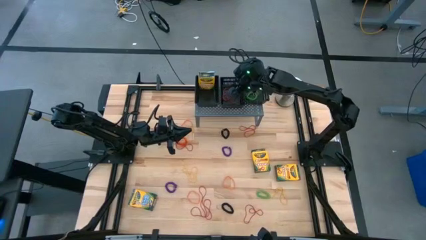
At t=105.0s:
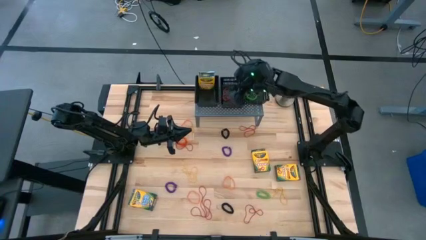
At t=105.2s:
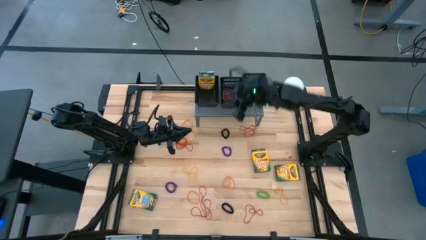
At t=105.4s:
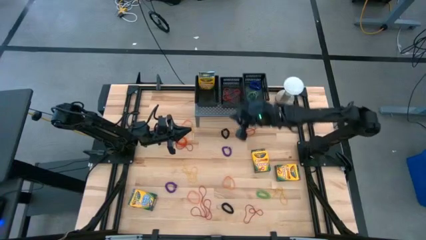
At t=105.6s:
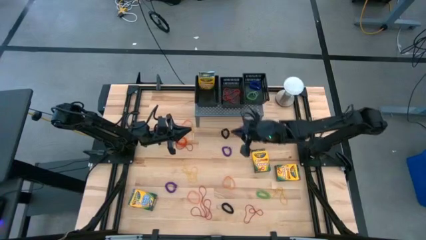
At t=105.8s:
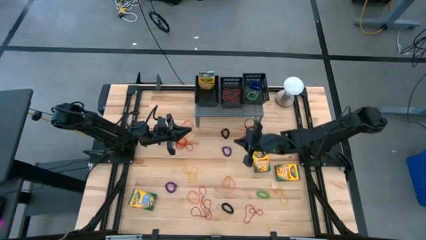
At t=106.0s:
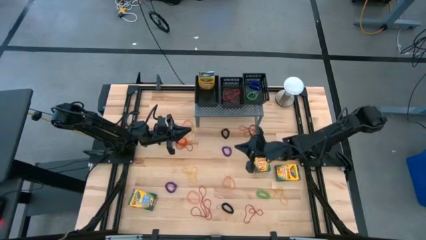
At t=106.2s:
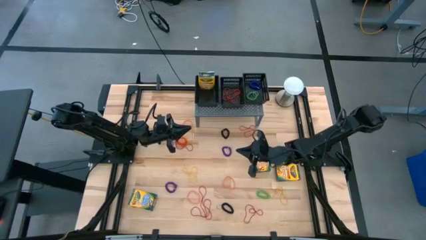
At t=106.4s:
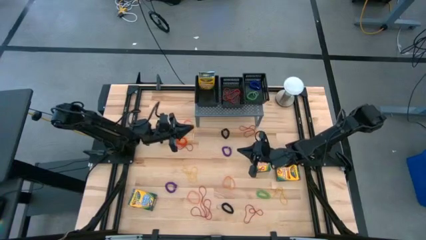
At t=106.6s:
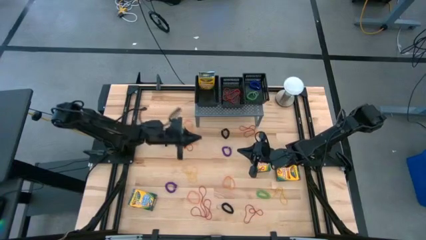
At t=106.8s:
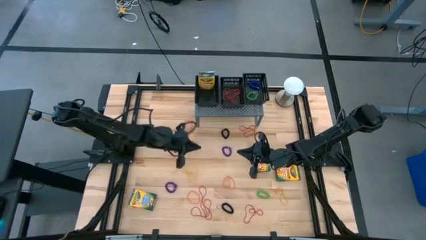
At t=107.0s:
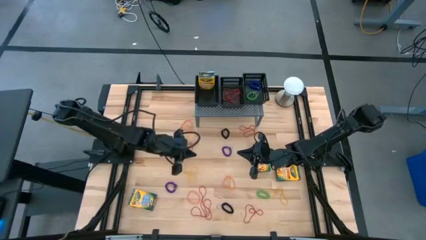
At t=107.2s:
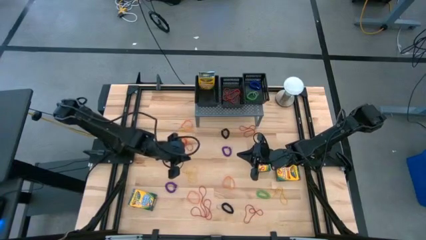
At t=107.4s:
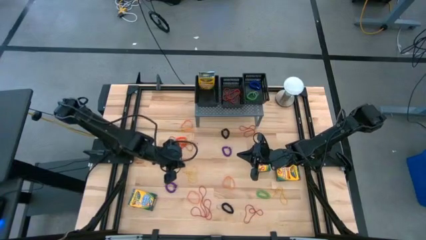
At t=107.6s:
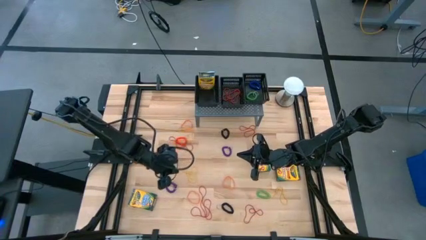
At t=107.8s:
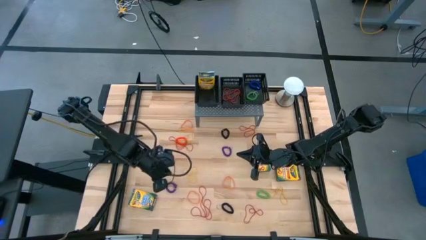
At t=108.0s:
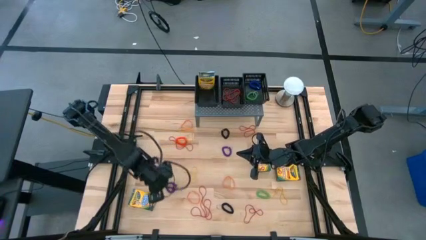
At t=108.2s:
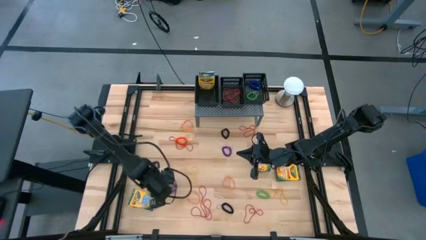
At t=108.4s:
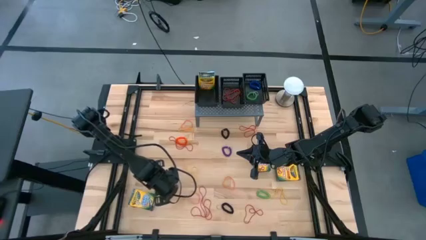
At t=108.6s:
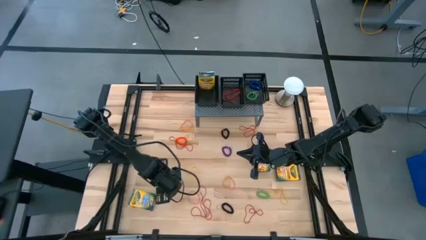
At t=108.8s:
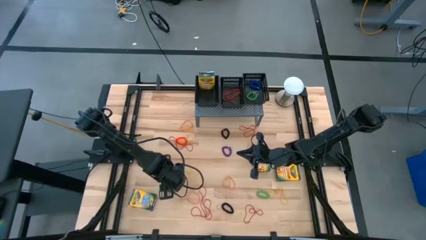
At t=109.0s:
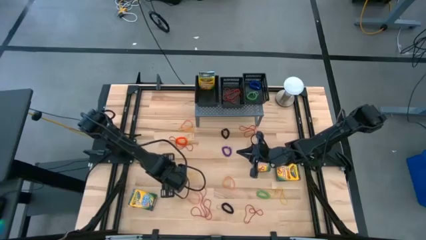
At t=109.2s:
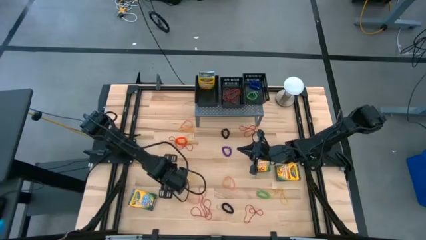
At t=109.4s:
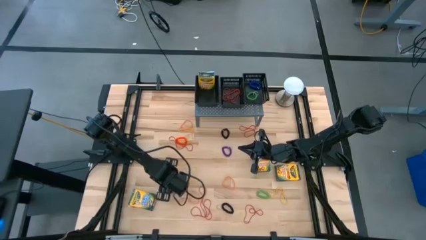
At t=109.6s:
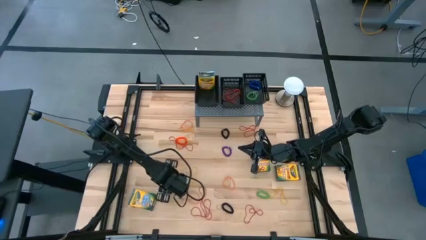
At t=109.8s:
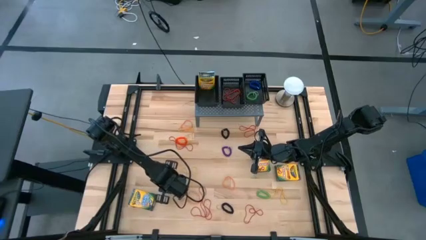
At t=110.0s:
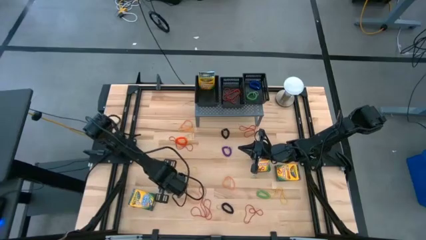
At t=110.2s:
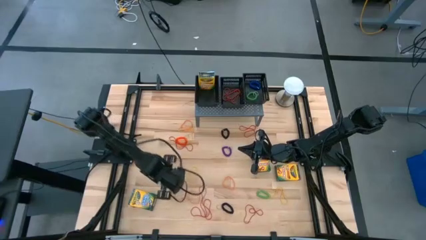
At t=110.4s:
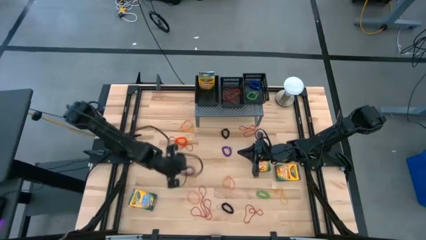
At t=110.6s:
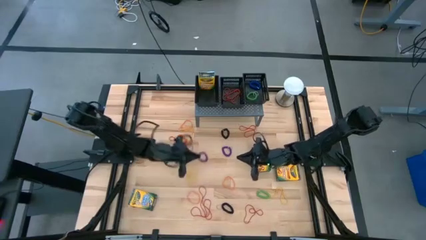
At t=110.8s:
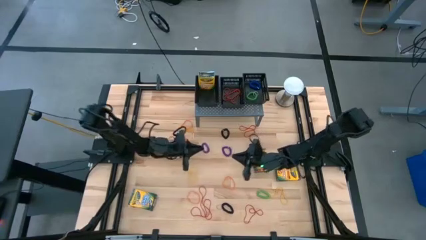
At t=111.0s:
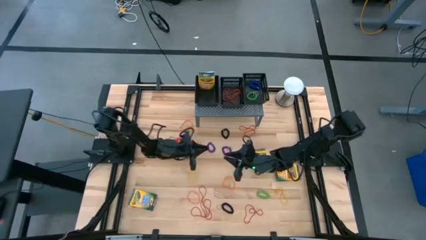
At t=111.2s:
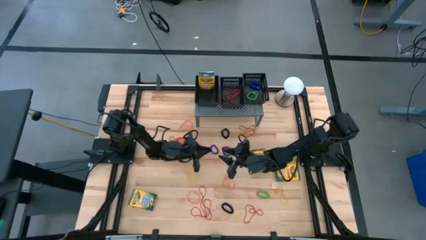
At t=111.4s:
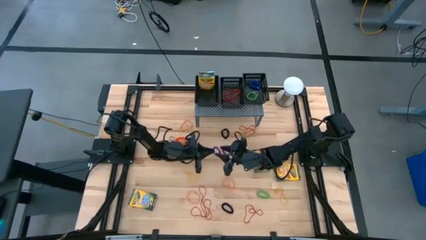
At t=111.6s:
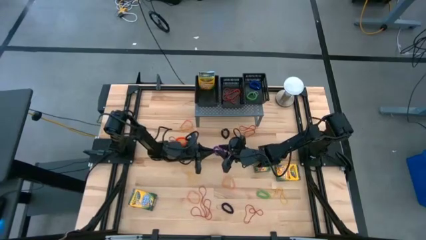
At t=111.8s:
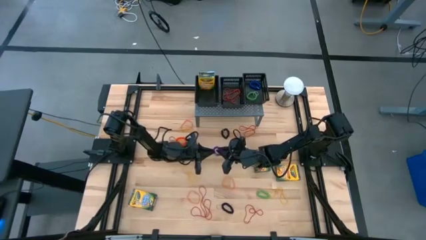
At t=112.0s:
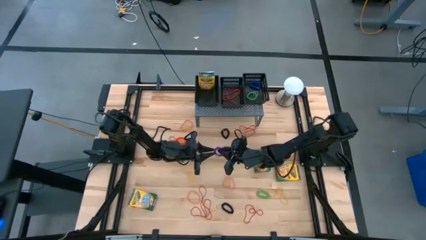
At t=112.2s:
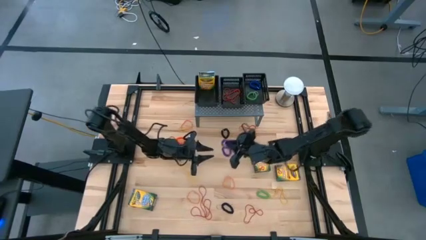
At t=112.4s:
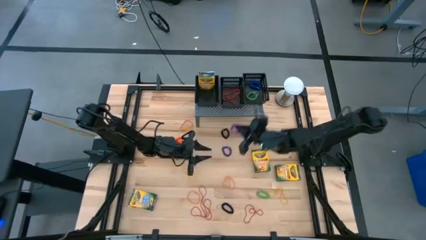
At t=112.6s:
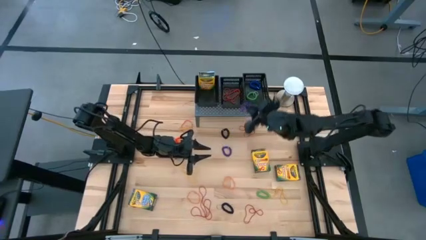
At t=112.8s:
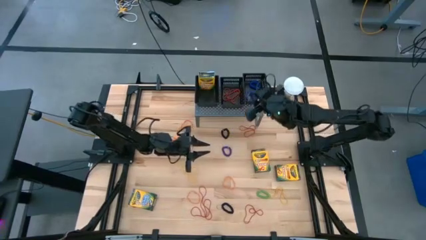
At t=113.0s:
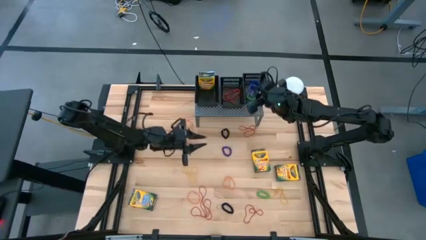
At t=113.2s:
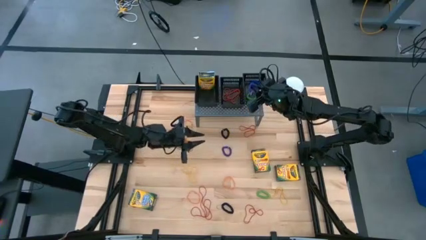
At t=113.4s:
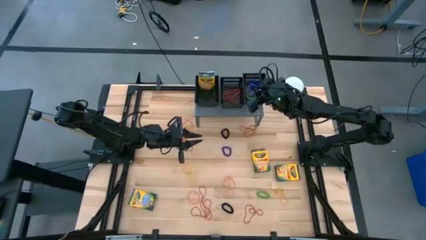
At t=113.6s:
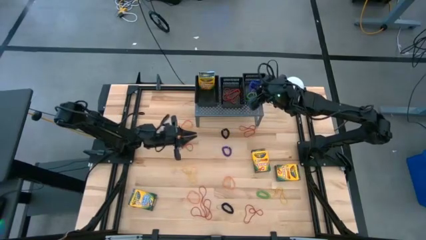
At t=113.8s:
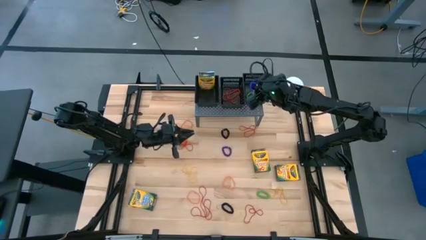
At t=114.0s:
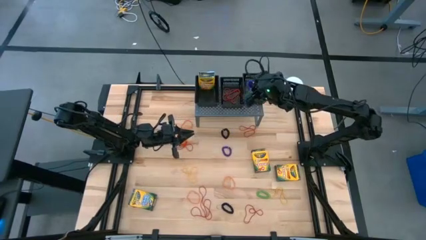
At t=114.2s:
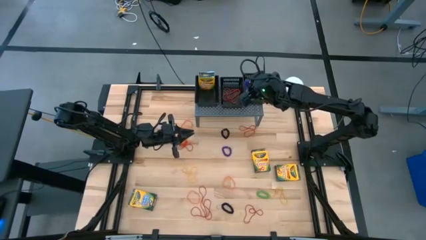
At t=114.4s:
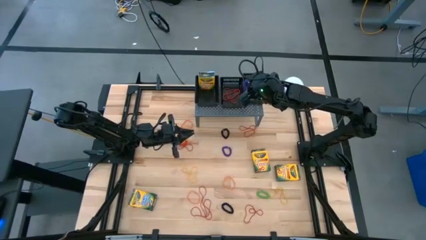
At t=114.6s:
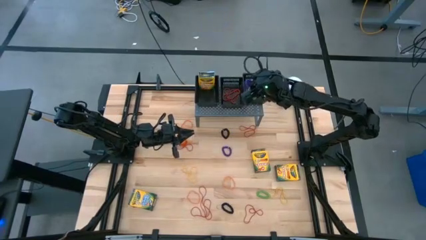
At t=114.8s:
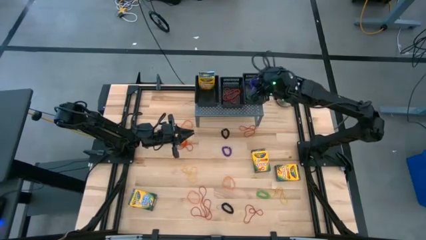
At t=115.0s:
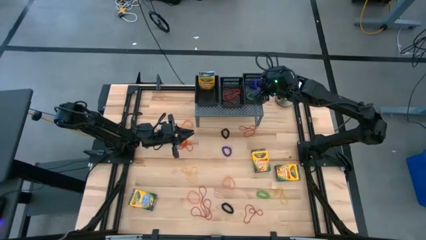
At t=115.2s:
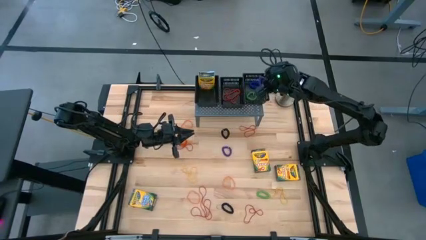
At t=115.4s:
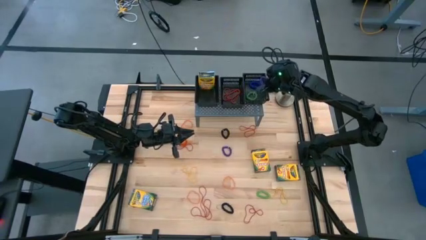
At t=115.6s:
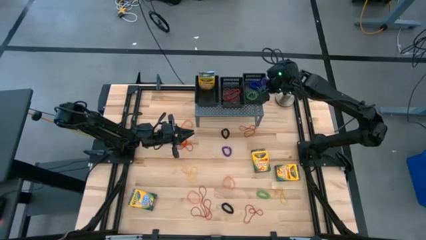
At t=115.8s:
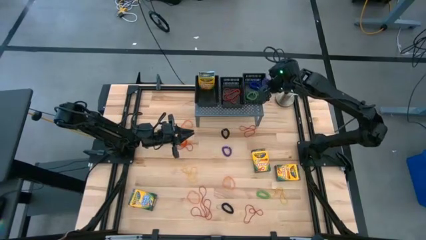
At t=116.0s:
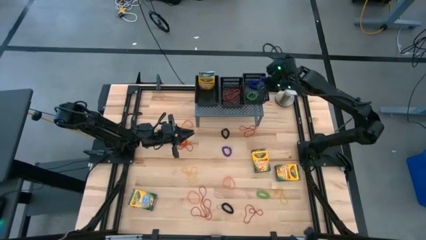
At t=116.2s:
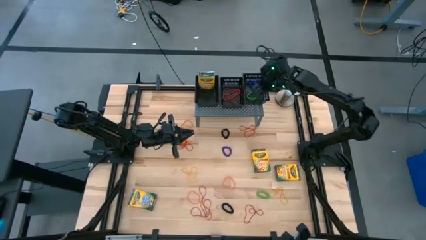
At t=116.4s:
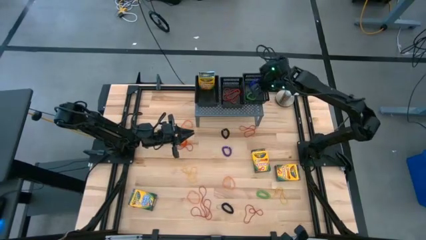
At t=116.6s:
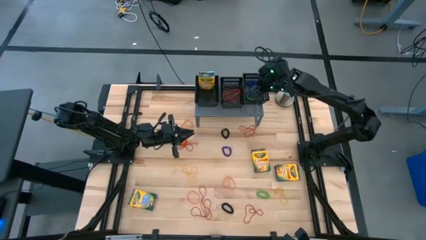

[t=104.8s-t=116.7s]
Task: Sort rubber bands into baskets
Put the purple spring rubberband into the right black basket on the shelf
